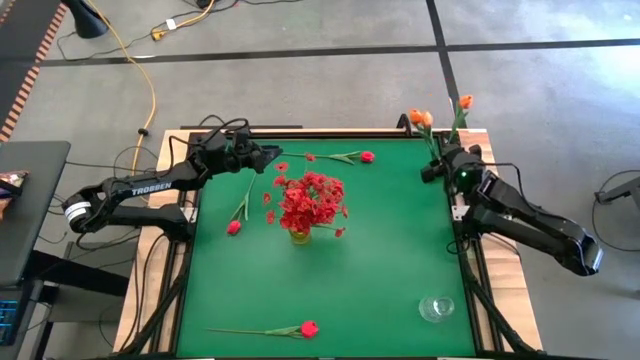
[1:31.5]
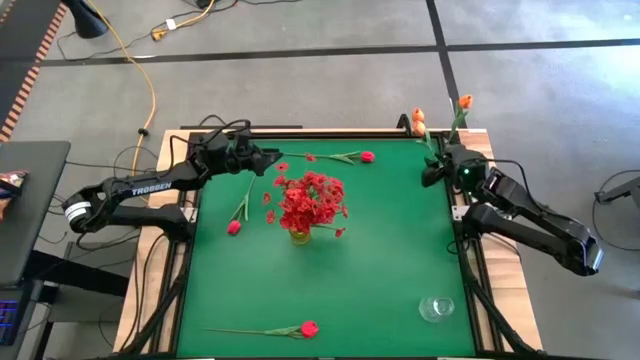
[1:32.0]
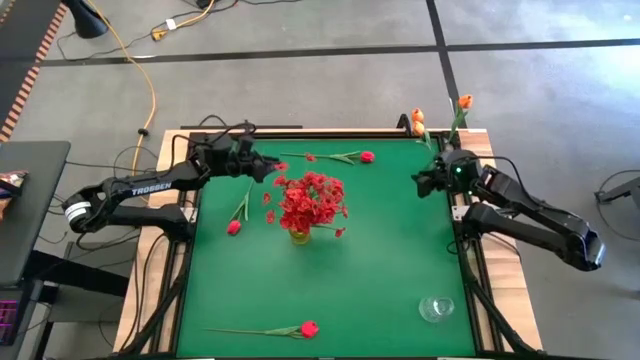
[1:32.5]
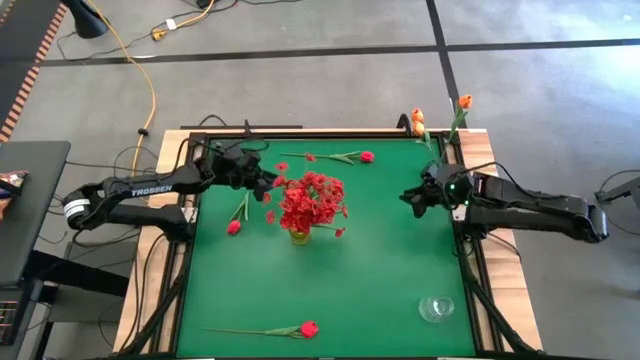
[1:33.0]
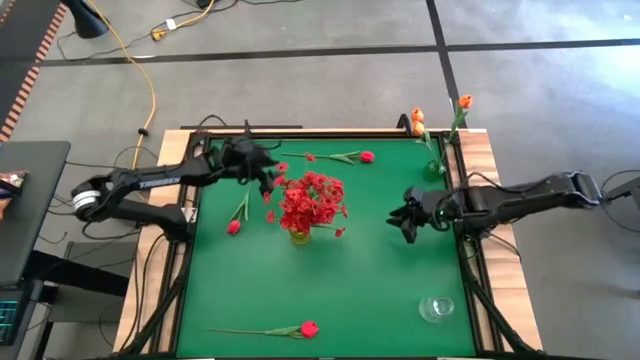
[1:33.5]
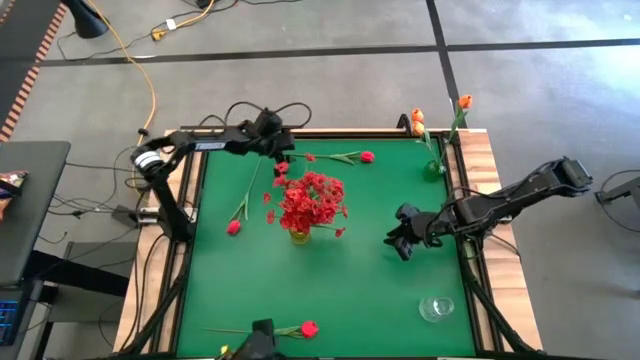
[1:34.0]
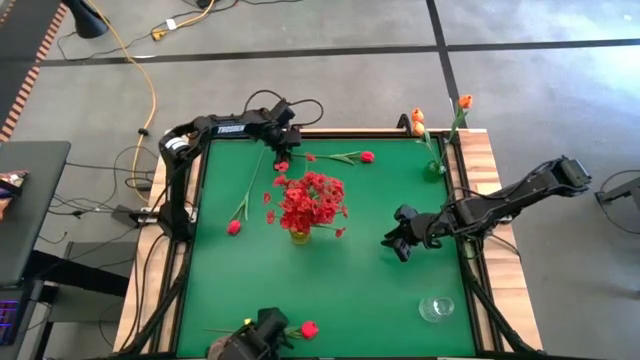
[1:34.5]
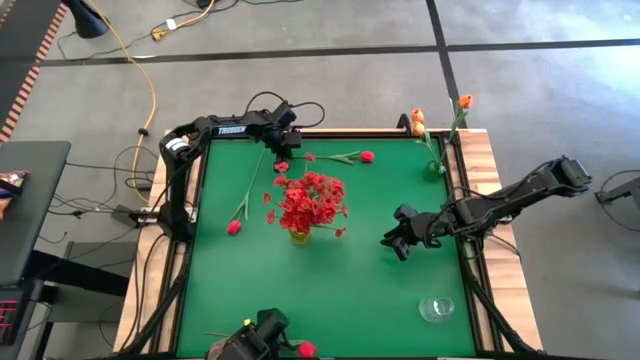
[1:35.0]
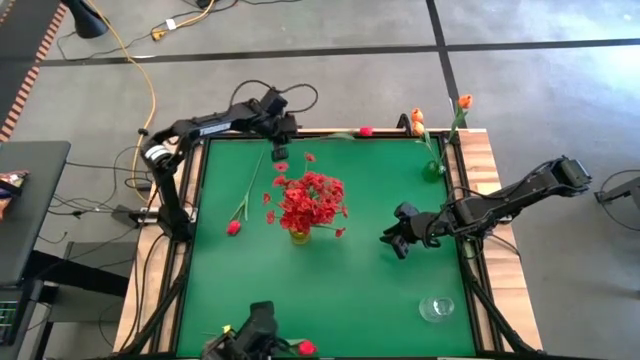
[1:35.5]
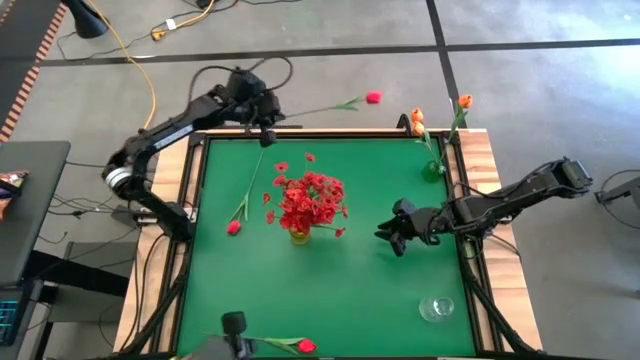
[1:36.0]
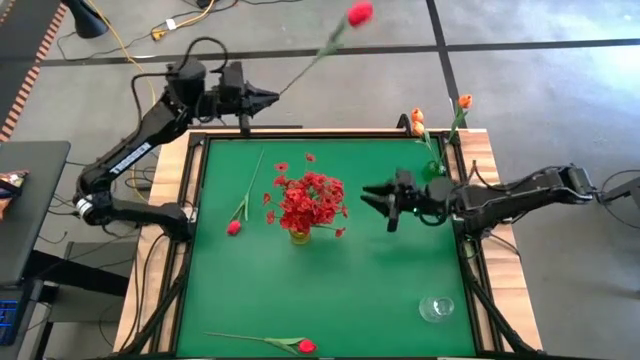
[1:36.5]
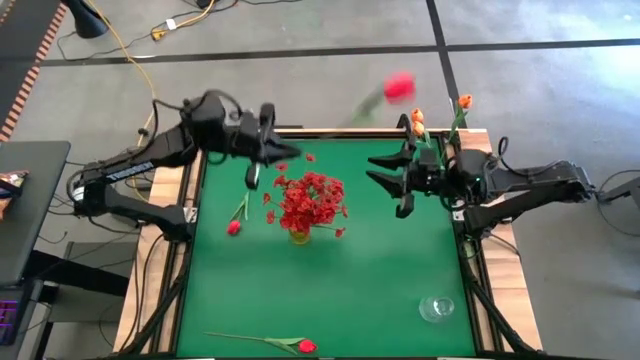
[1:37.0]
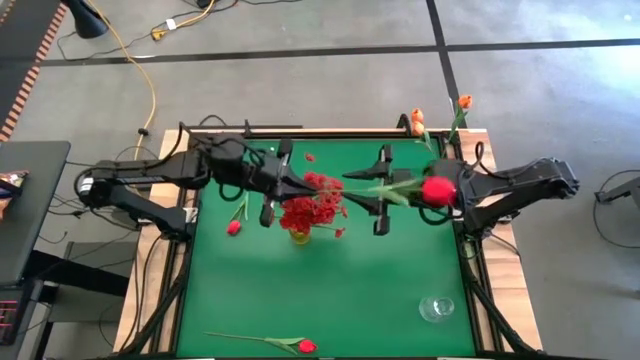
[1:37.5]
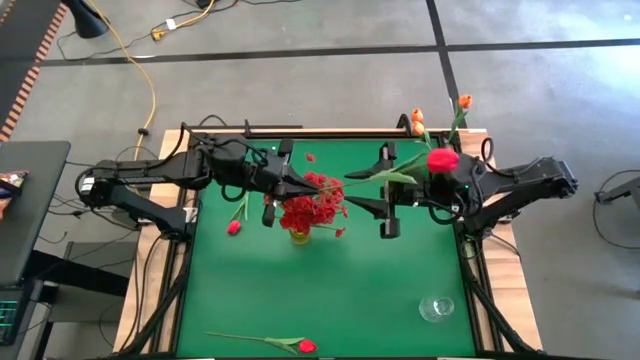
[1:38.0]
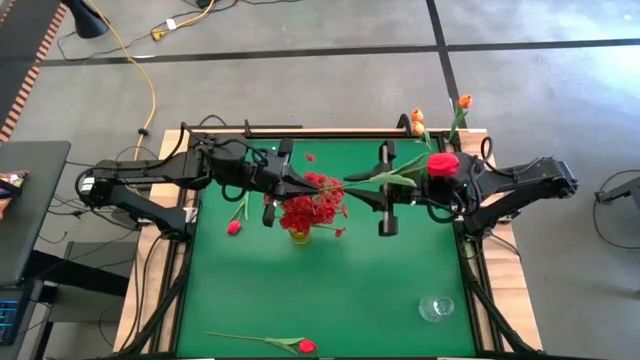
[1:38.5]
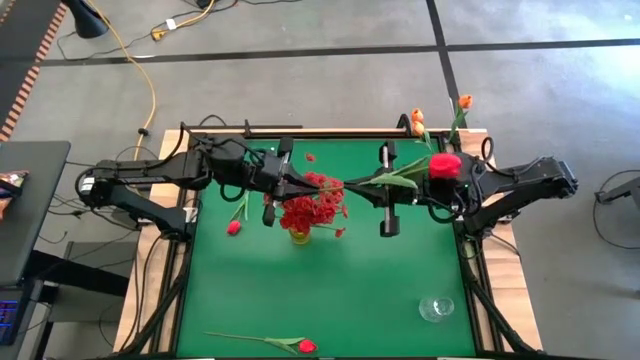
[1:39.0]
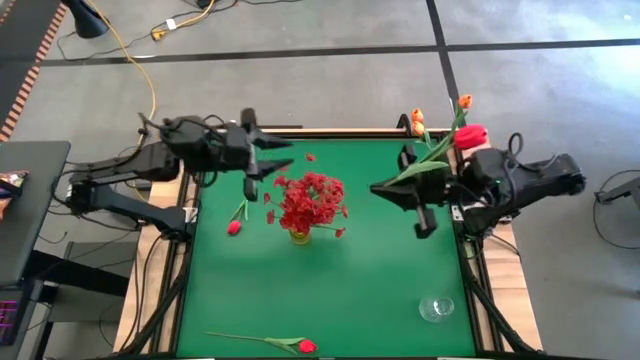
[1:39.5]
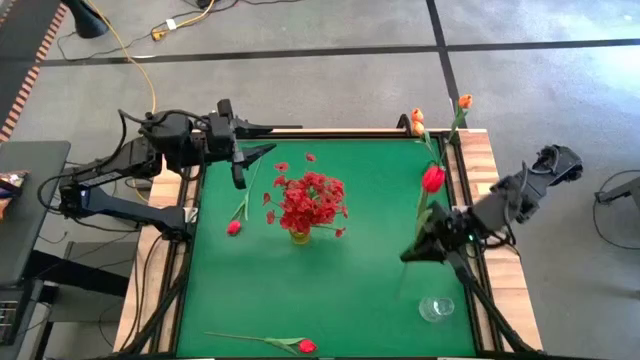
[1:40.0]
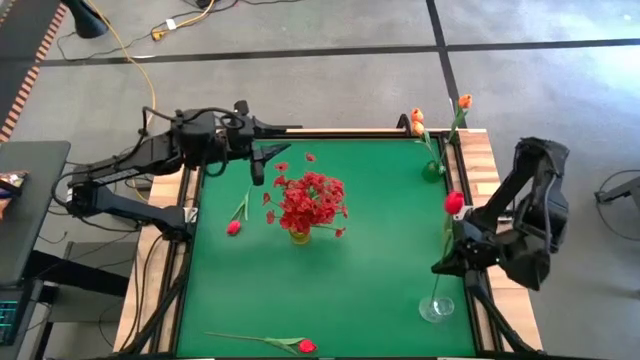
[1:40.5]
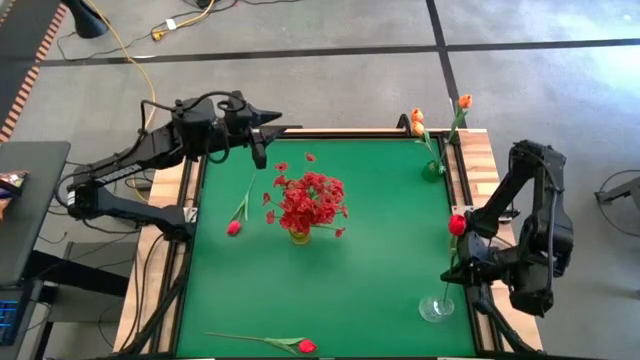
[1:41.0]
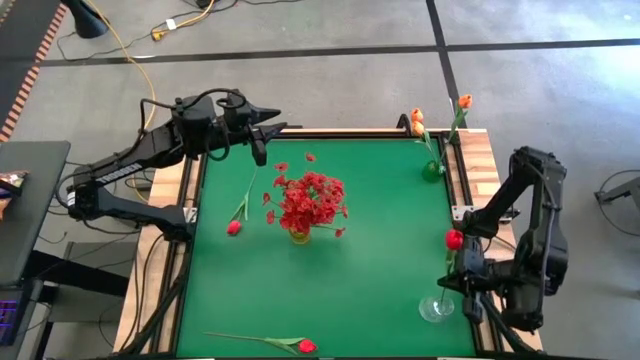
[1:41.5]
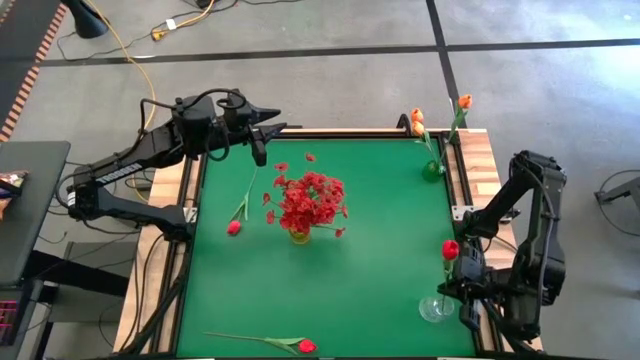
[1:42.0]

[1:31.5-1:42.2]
Task: Sort flowers into vase by color
Put the top red flower into the transparent vase

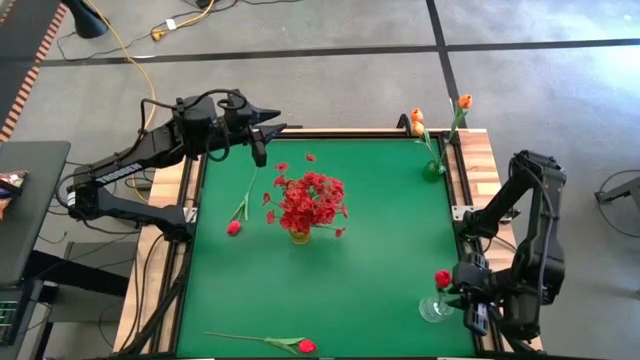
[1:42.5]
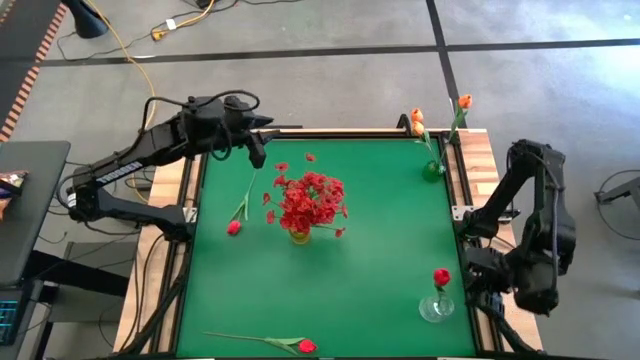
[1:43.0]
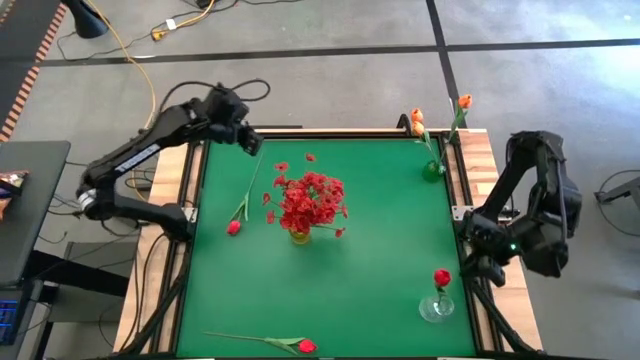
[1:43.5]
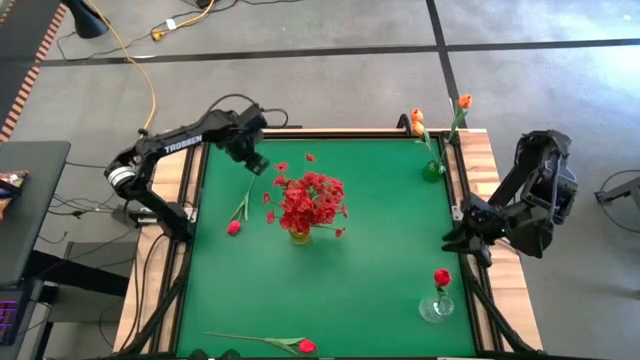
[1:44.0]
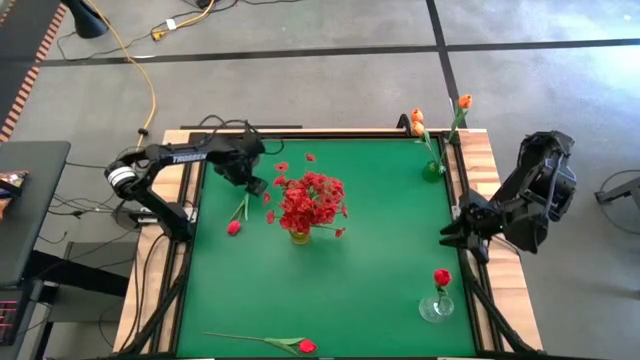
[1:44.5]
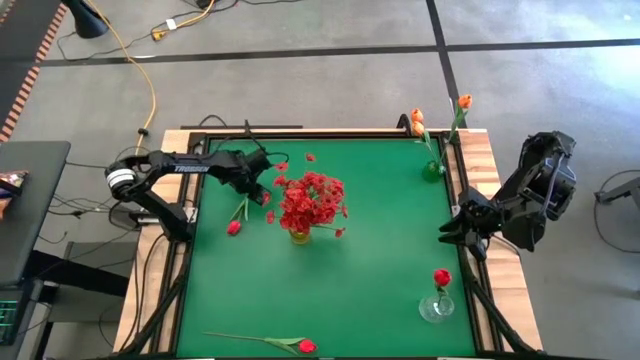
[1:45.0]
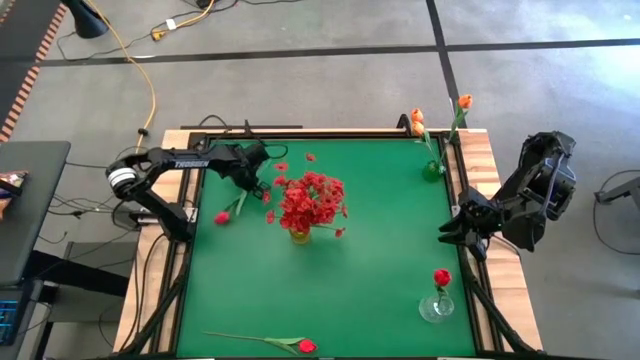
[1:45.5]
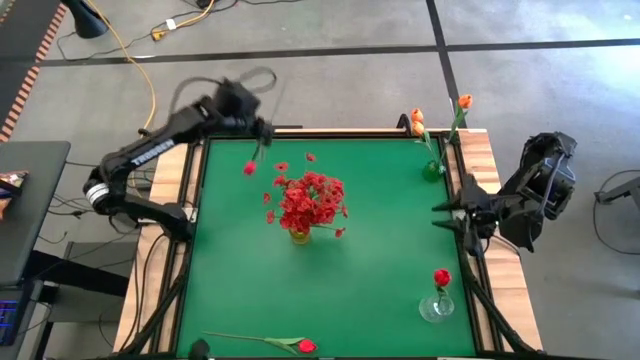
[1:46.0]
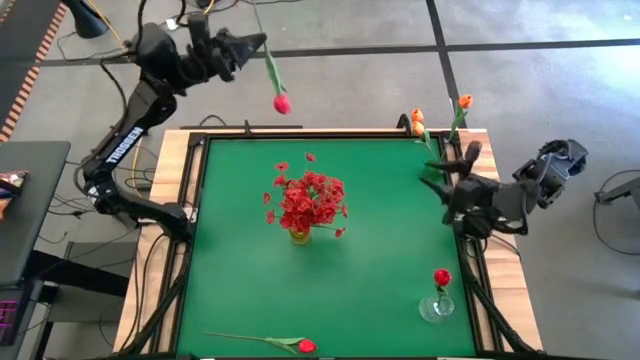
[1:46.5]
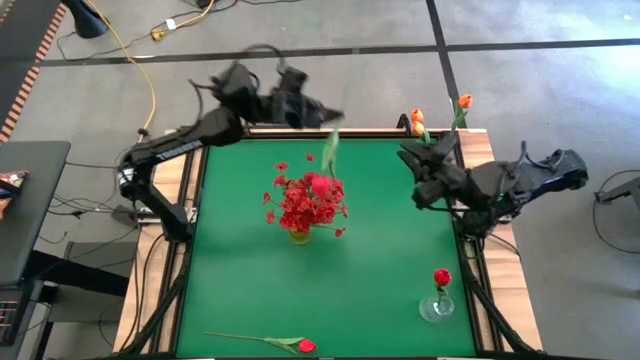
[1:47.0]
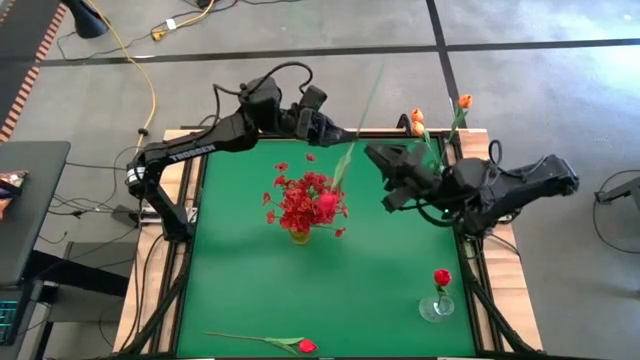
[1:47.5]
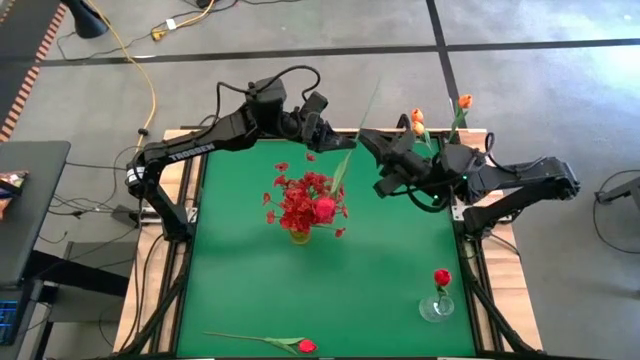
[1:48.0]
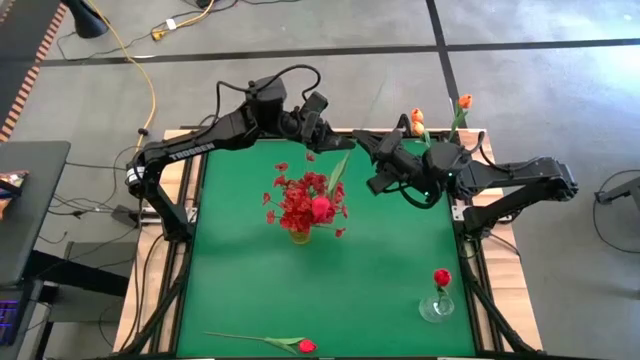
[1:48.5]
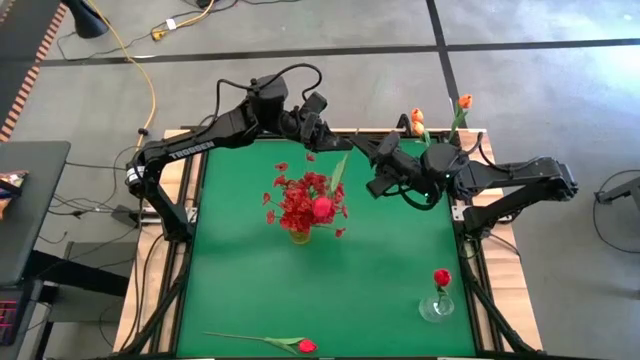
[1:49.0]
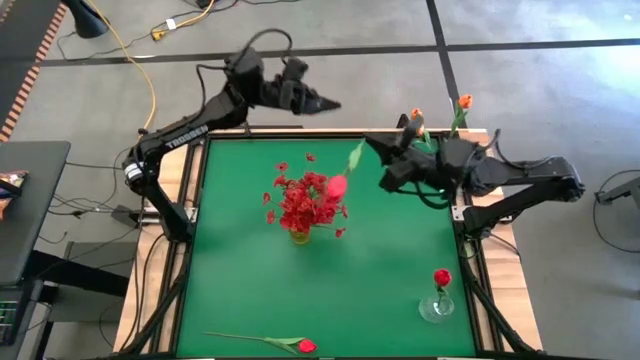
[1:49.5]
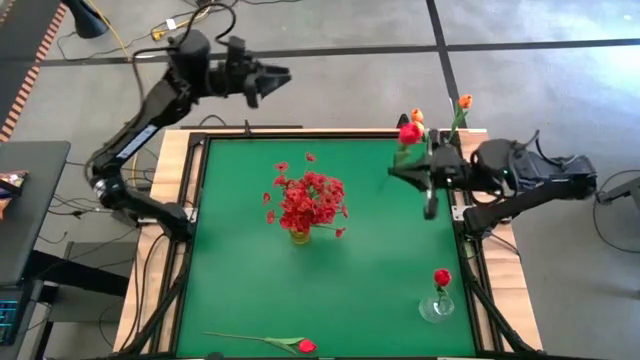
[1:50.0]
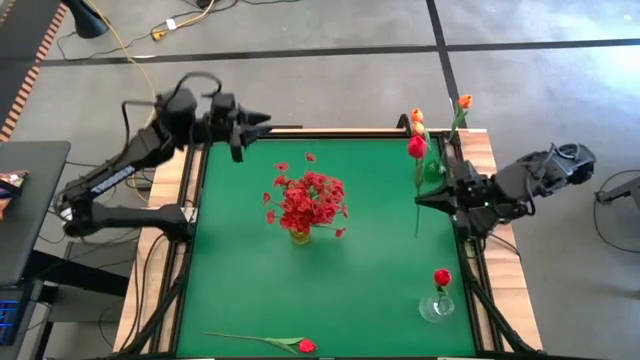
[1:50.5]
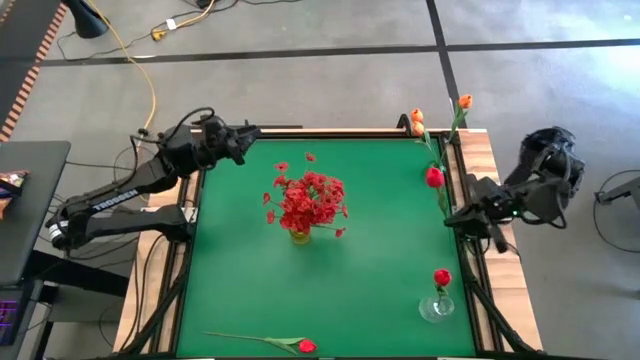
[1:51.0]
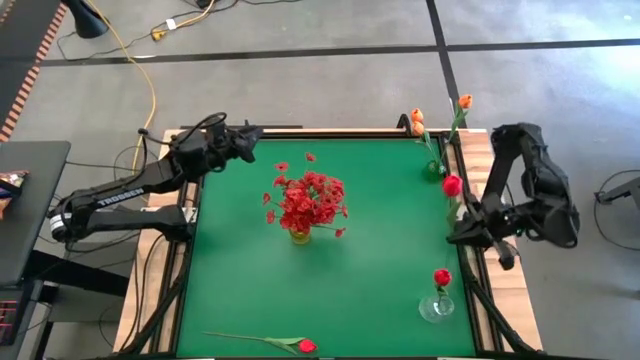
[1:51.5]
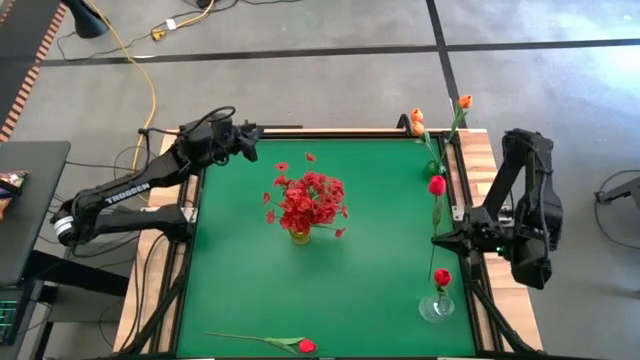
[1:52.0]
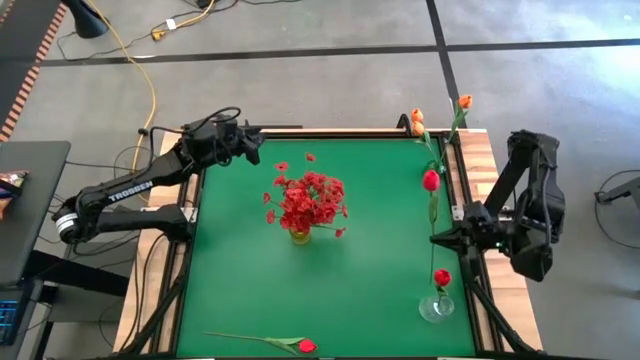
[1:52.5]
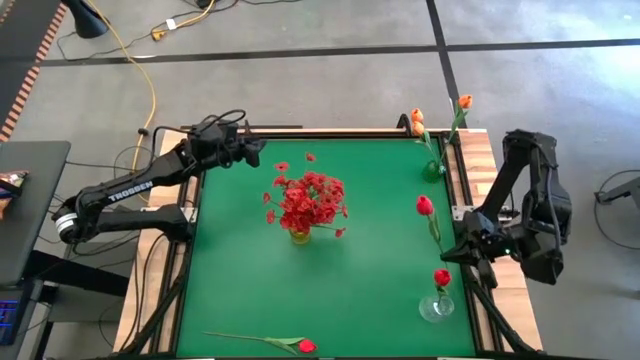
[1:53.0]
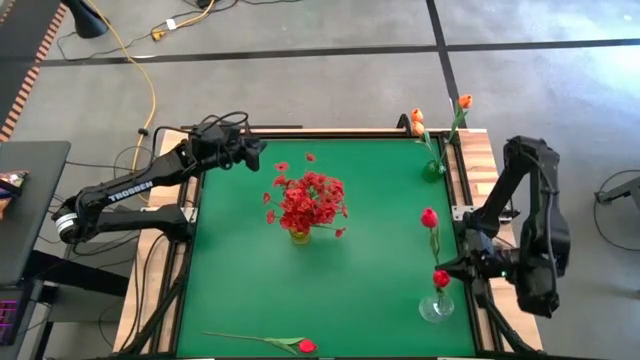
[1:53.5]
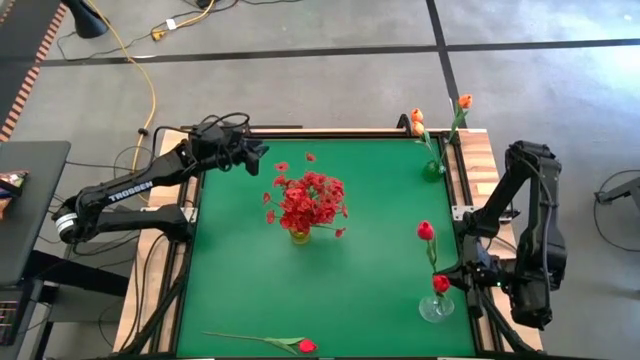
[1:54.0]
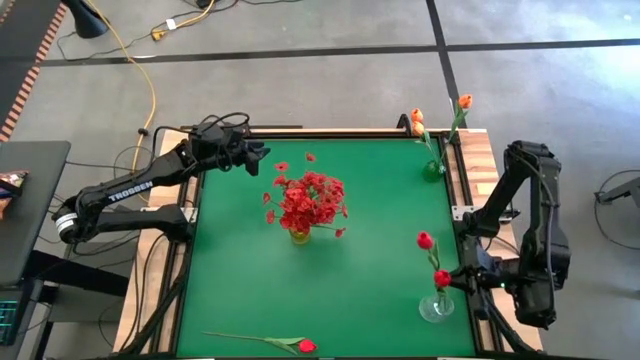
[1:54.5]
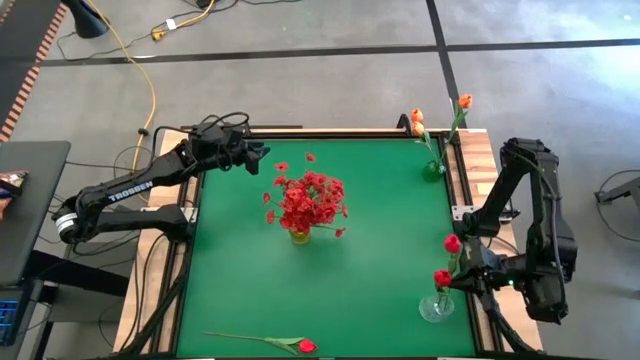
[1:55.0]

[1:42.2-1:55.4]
Put the top red flower into the transparent vase
